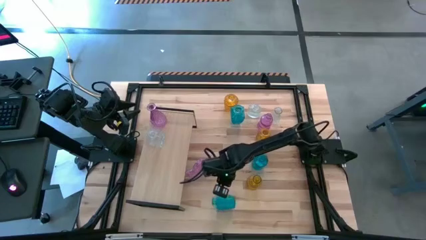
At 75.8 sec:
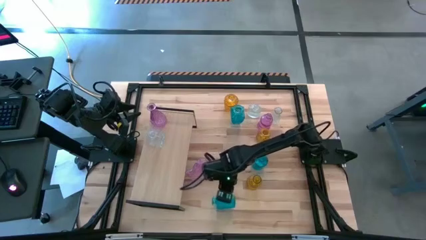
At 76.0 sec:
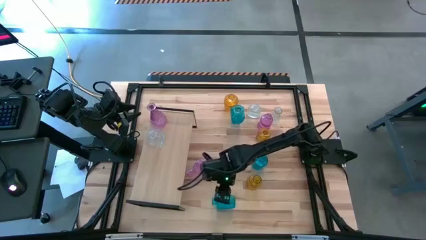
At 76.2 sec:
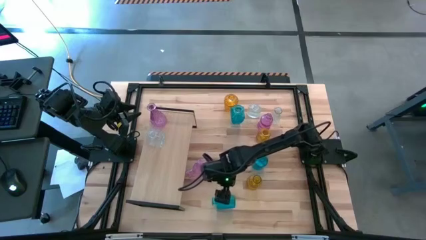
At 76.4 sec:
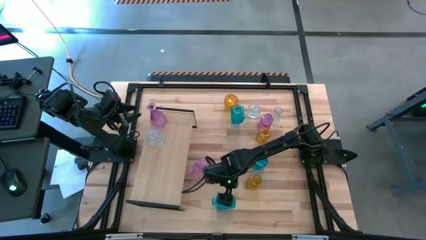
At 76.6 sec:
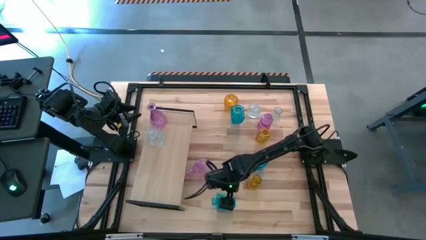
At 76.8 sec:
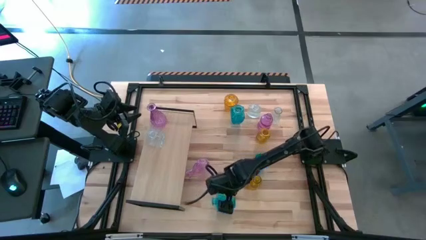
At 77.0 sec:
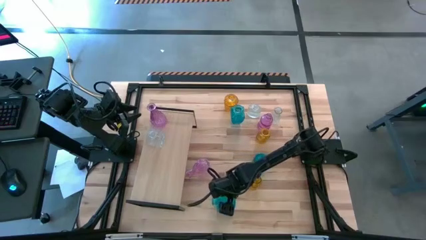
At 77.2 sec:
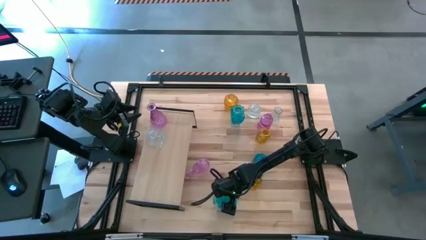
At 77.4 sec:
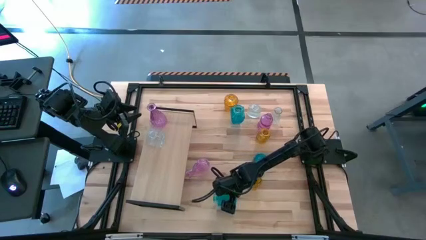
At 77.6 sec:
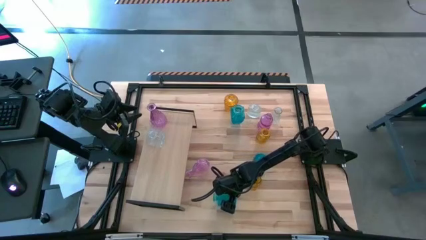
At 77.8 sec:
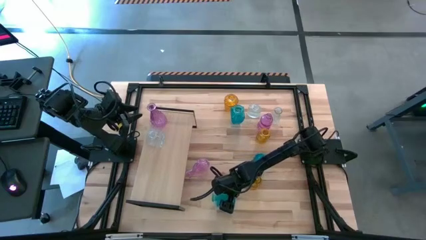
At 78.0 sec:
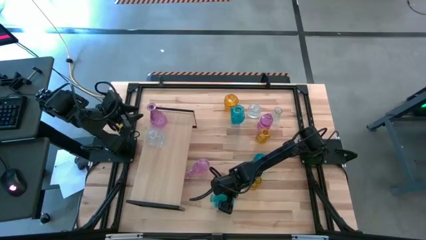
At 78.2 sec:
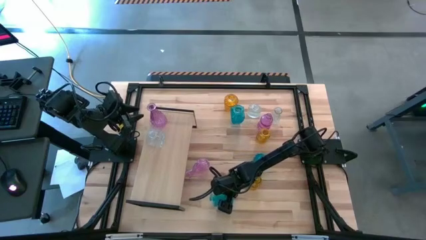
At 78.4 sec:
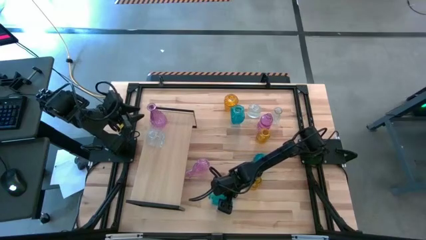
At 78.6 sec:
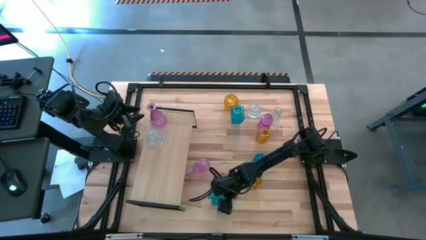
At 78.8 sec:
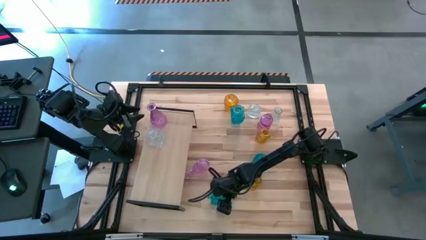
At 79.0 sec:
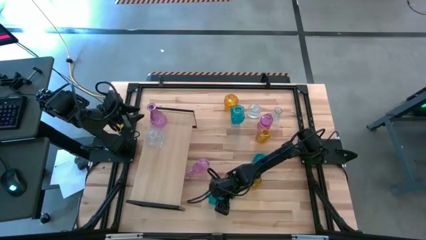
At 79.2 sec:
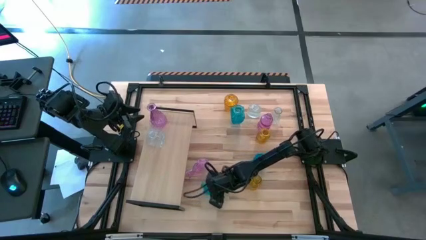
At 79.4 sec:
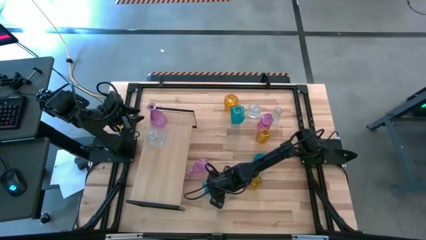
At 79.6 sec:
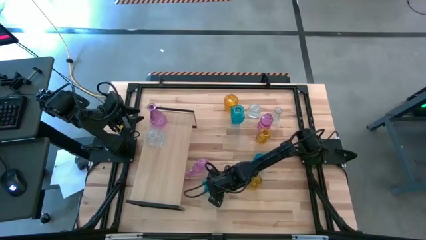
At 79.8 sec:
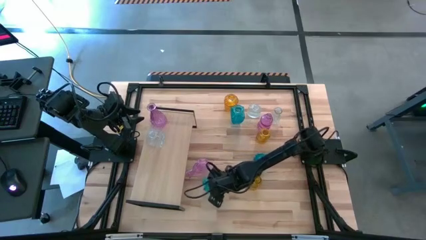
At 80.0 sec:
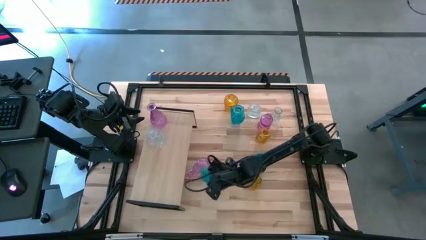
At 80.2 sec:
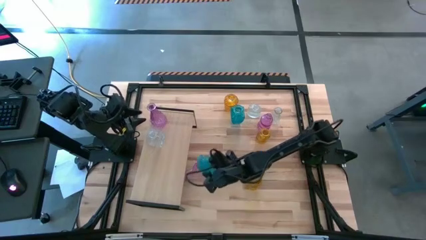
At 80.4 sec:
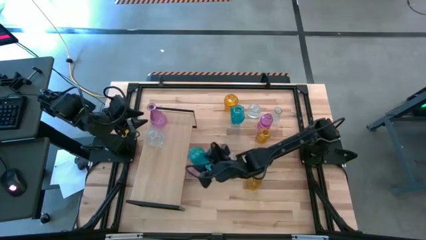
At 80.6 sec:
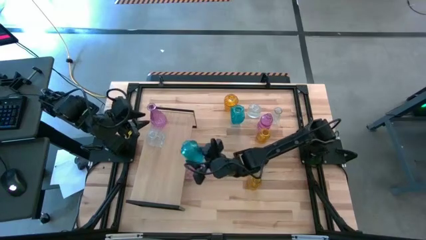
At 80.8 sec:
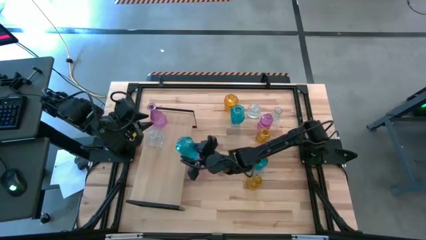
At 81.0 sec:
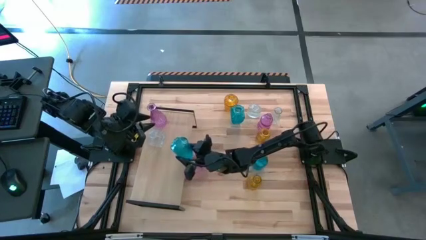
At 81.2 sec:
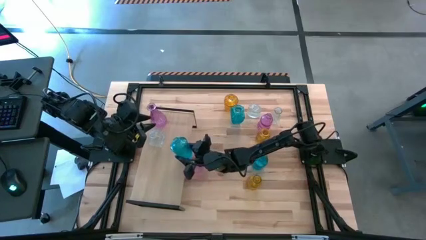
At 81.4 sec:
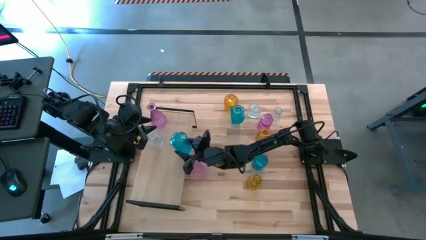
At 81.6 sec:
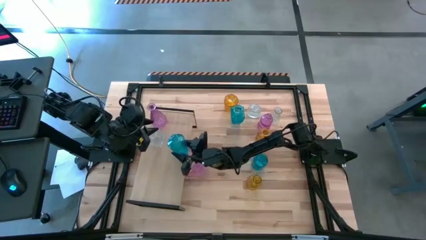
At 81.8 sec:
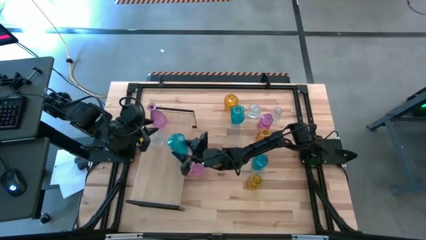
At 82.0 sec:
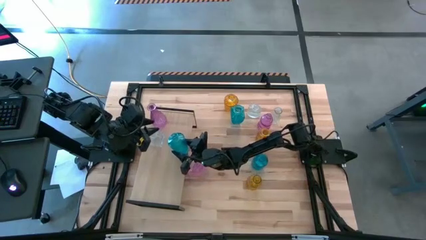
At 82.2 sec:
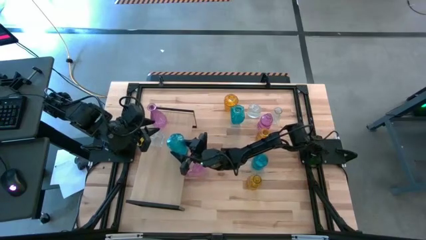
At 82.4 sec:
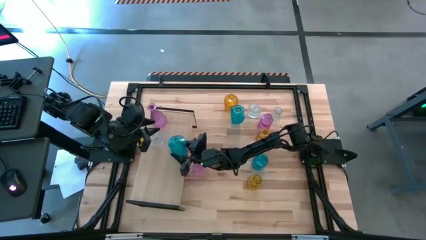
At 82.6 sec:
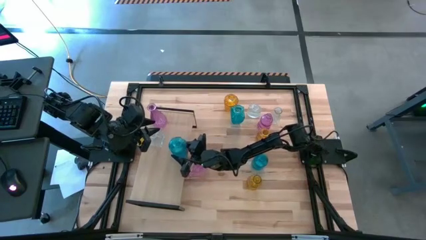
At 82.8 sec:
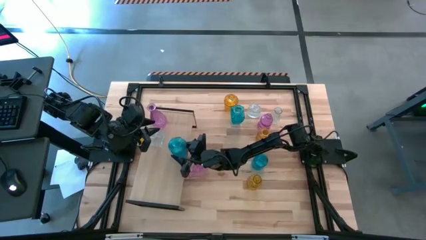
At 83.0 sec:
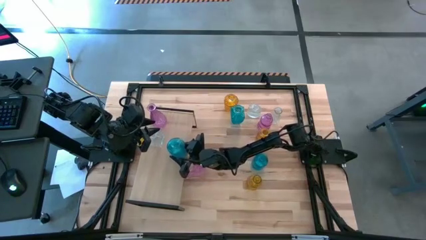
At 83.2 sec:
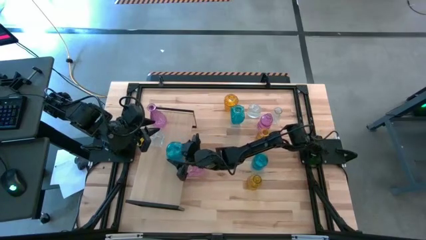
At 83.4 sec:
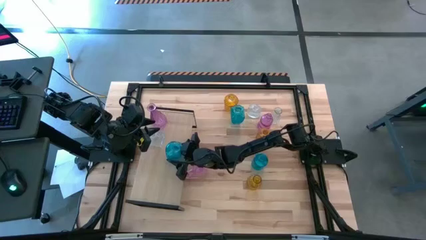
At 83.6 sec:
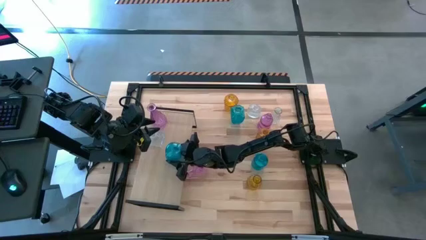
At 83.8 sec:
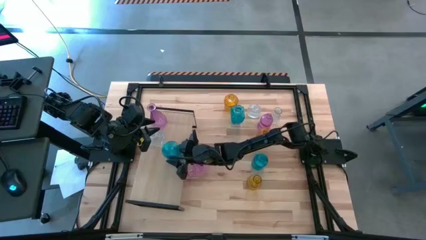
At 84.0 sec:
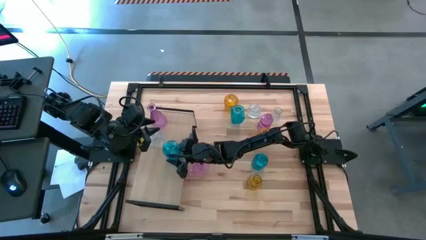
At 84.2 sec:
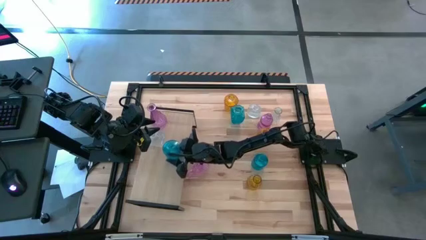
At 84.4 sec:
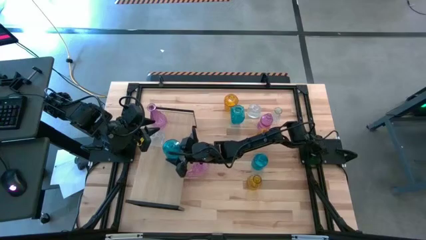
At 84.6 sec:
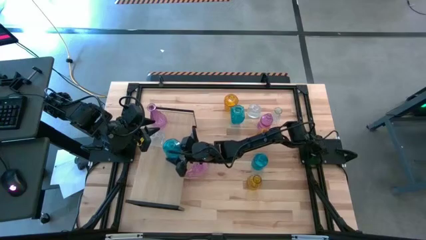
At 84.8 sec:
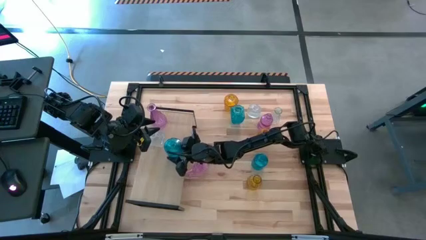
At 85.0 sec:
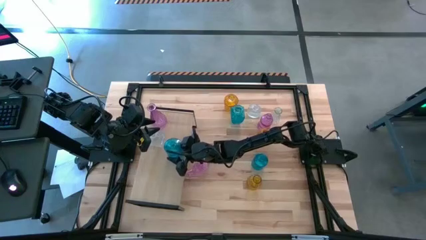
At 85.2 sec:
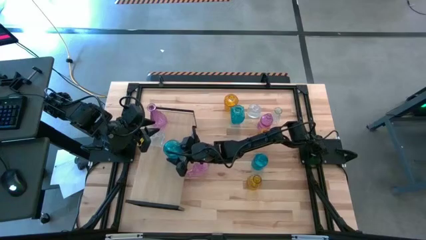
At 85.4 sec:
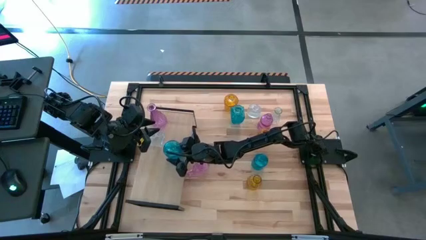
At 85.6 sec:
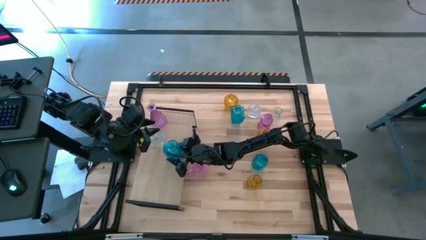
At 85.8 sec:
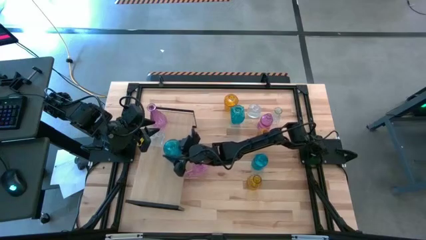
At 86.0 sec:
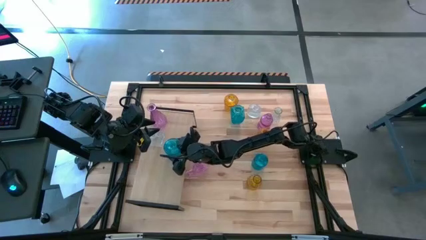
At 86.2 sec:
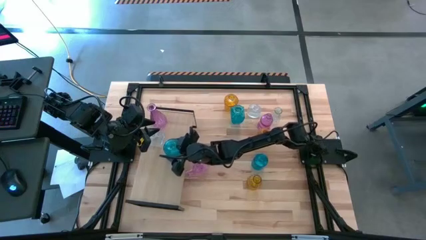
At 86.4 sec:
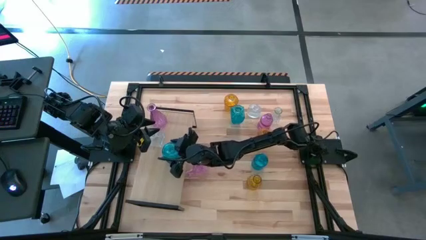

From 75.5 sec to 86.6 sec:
Task: sort vases onto shelf
Put the bottom left blue flower vase on the shelf

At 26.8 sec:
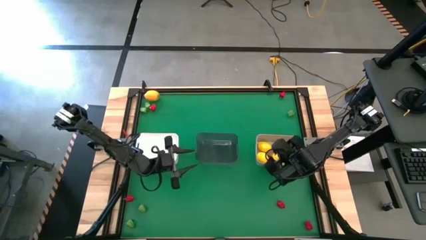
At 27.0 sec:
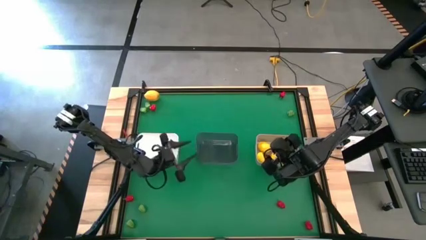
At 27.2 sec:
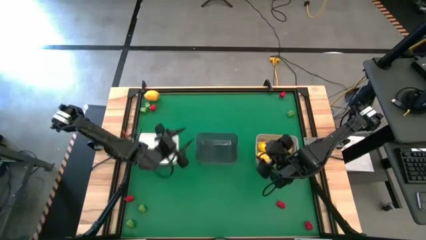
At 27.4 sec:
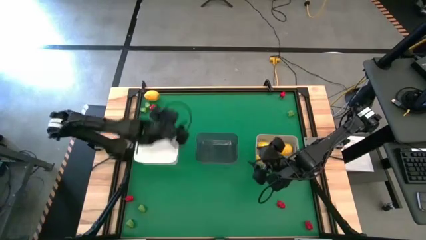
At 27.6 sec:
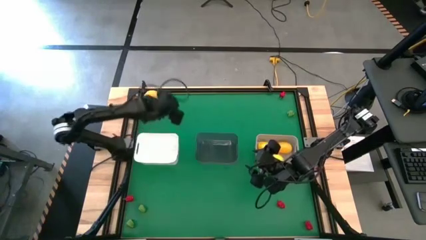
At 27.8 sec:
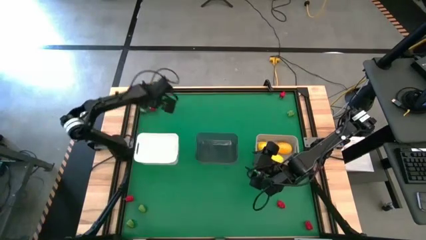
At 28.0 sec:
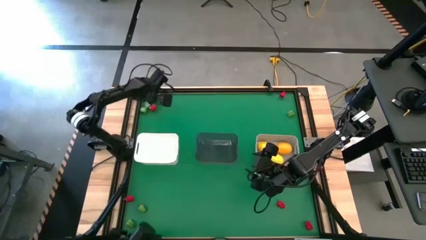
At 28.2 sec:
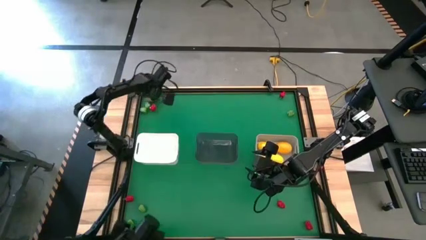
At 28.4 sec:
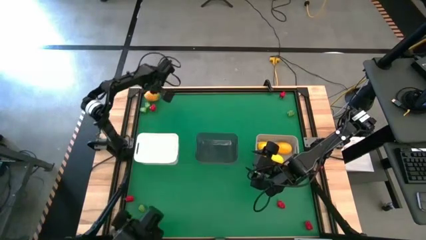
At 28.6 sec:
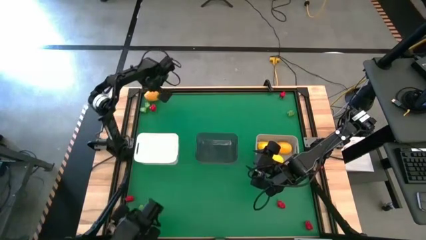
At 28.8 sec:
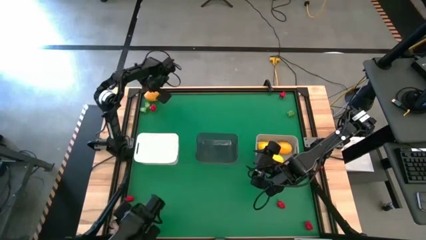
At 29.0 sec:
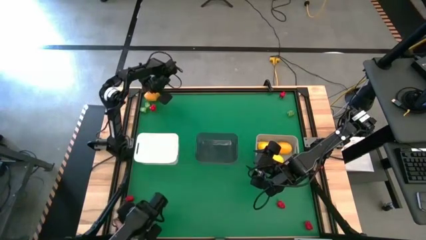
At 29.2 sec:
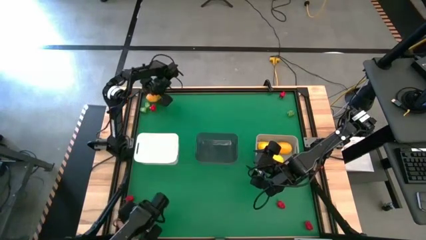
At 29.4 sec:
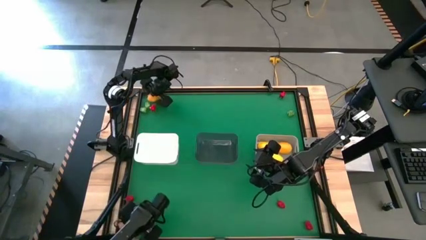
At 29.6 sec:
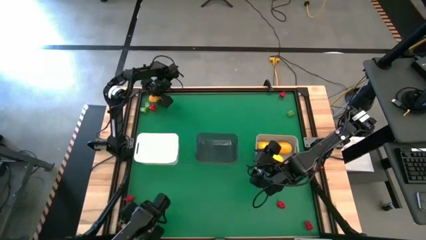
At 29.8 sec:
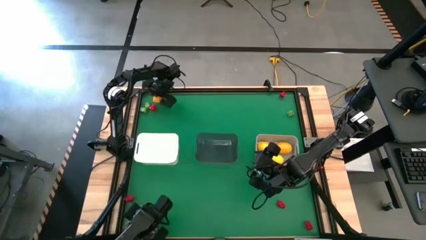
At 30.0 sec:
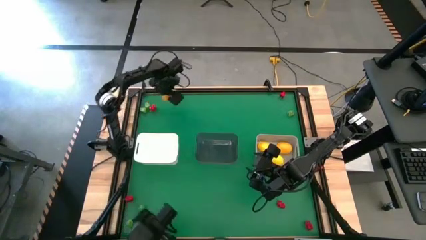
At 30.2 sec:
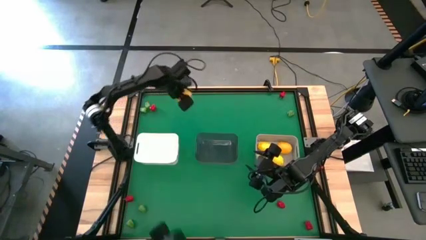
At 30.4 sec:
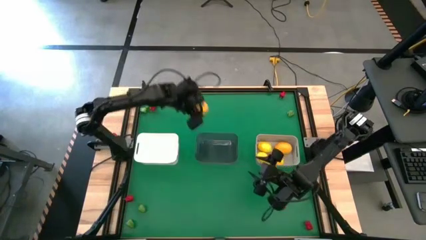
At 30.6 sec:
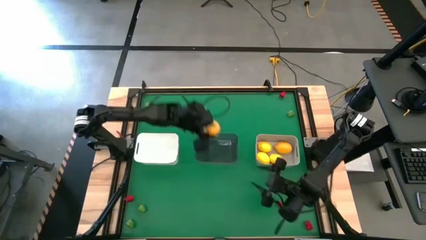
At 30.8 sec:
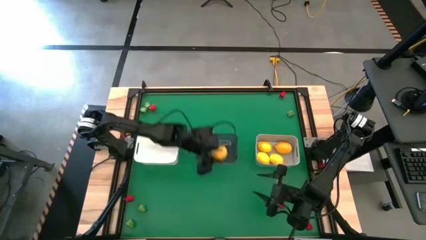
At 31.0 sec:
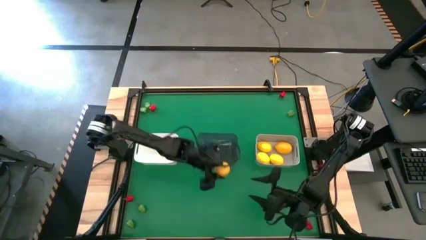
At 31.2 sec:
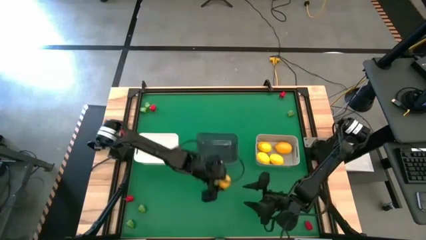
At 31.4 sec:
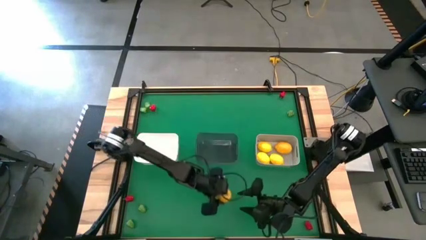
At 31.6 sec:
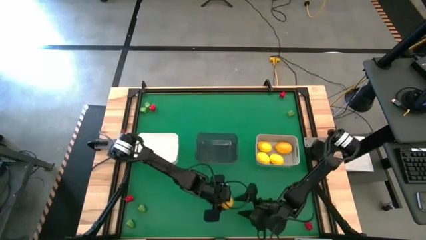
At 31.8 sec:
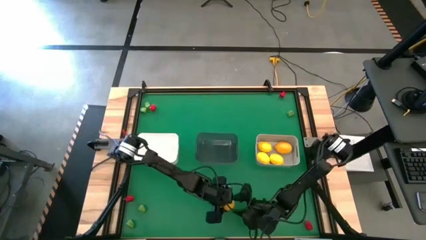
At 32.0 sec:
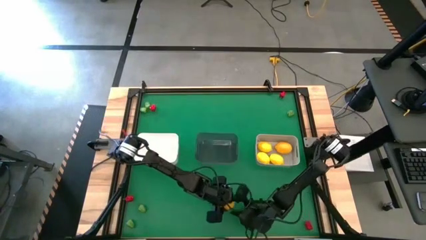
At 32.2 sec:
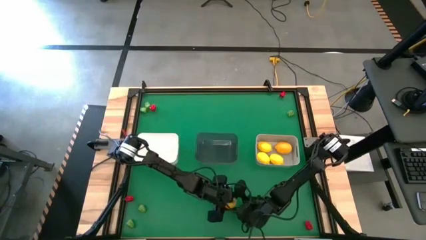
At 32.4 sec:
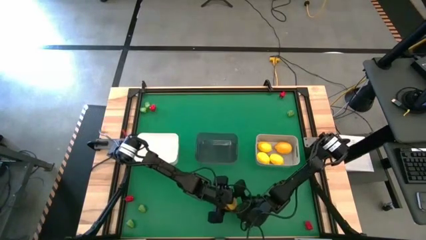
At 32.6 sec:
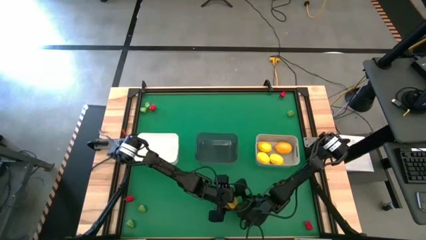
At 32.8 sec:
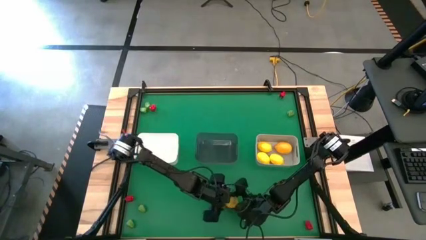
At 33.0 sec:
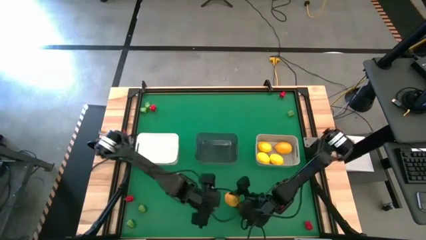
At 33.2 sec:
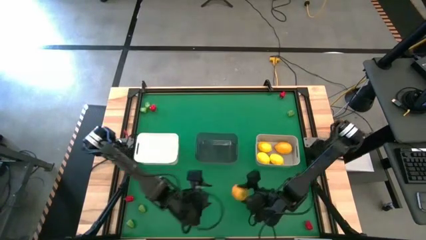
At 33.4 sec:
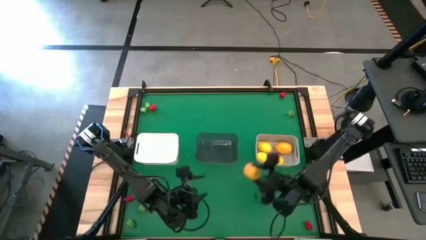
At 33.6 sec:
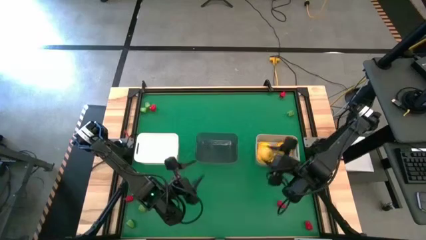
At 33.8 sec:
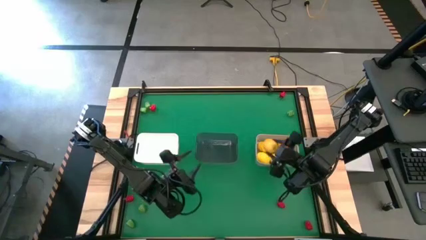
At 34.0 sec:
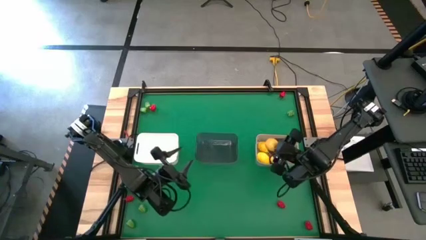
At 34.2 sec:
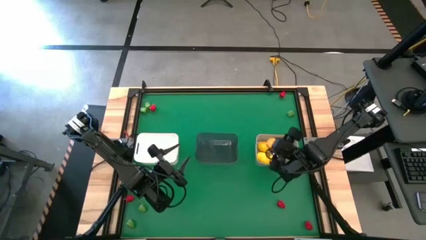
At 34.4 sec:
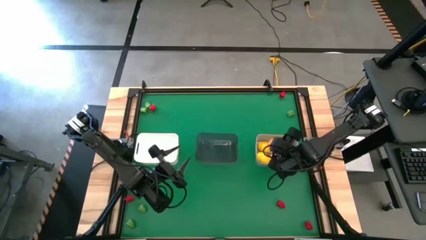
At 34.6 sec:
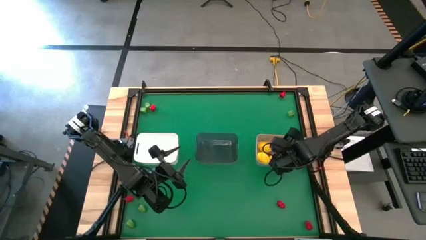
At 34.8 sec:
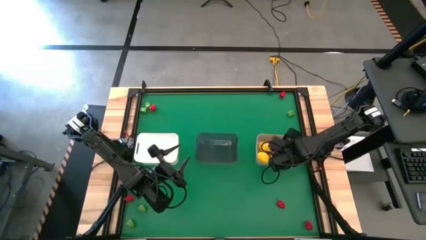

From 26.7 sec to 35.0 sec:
Task: Sort produce into baskets
Put the yellow lemon into the gray bin
